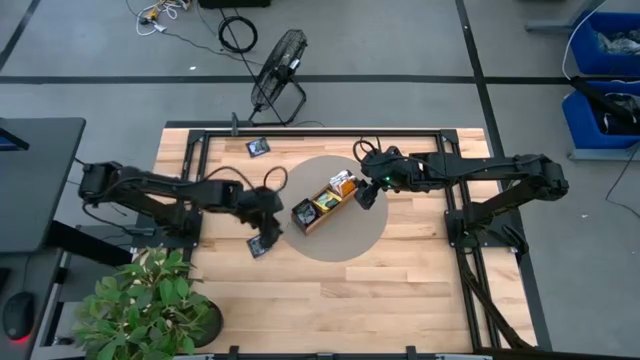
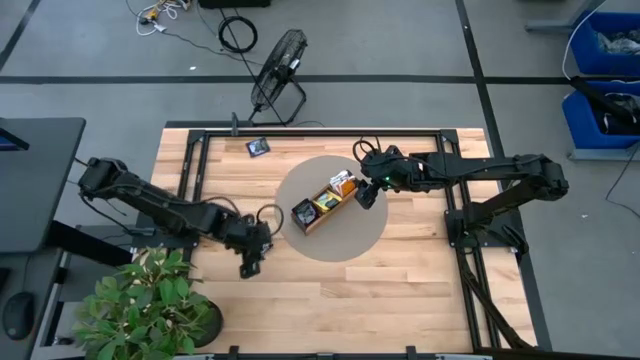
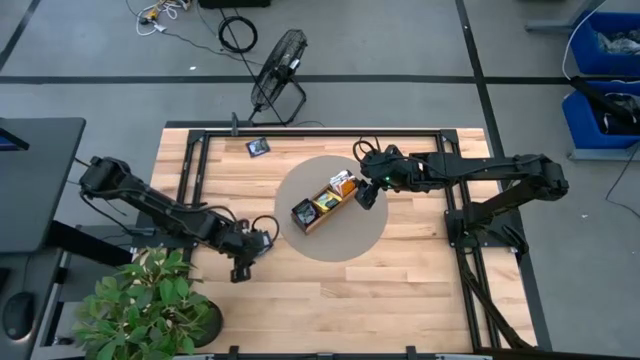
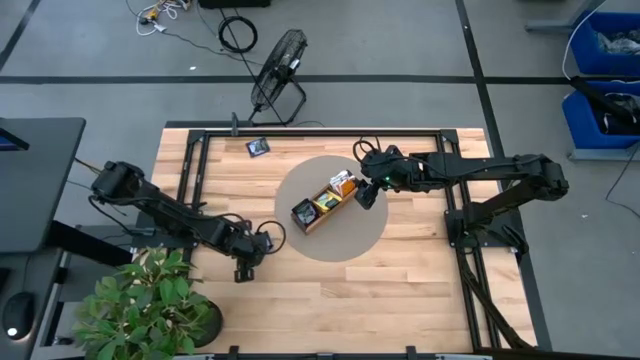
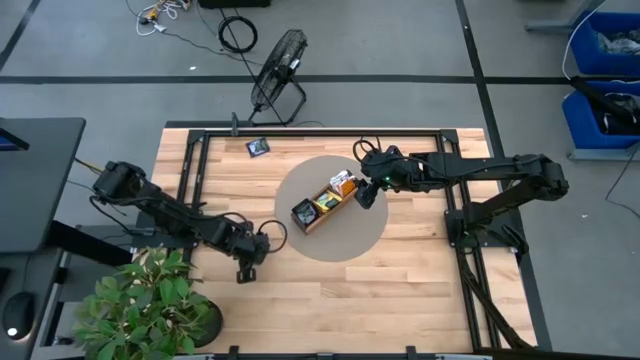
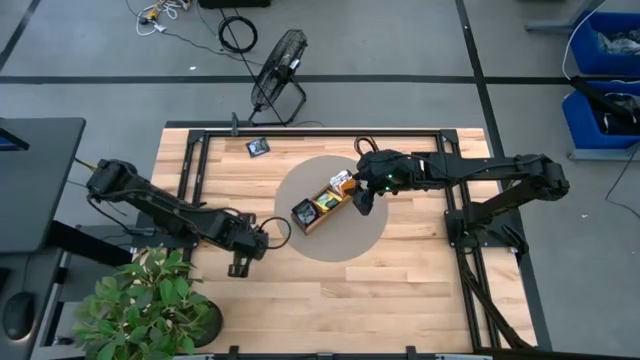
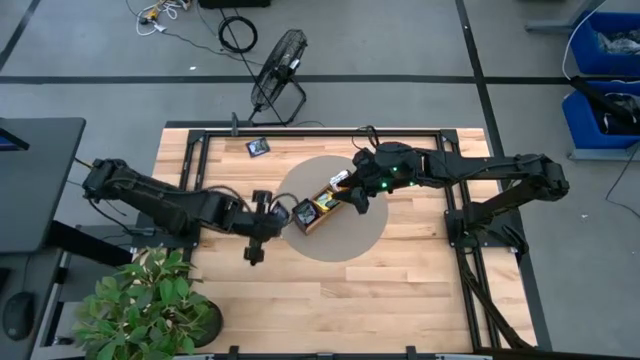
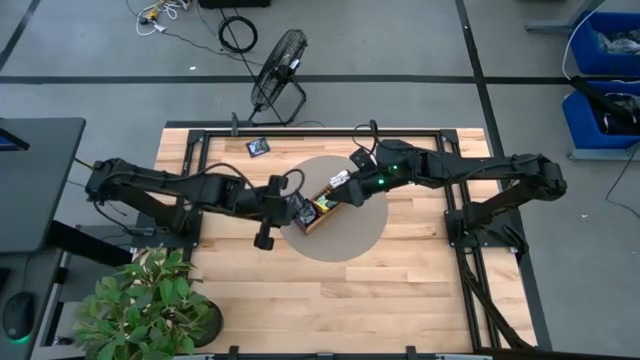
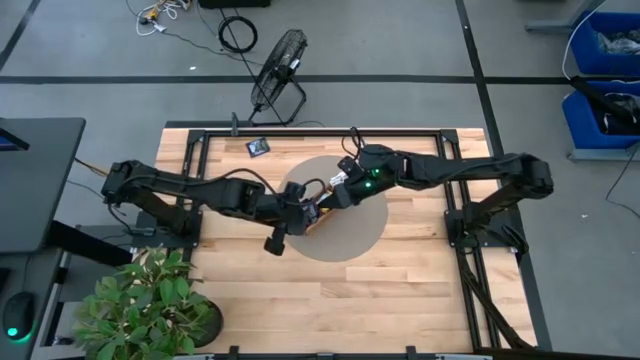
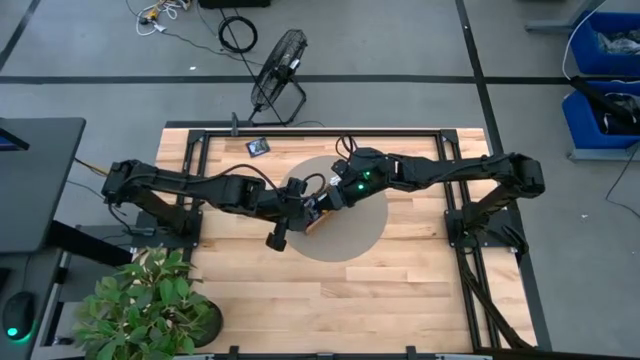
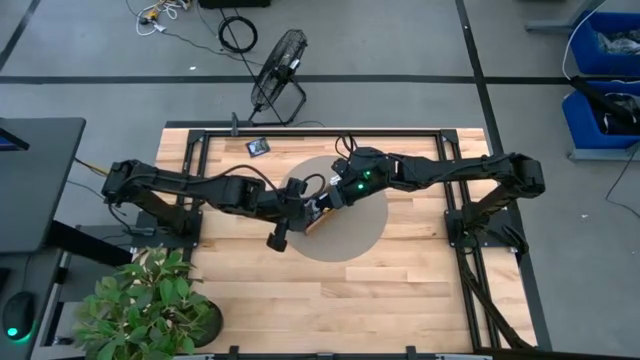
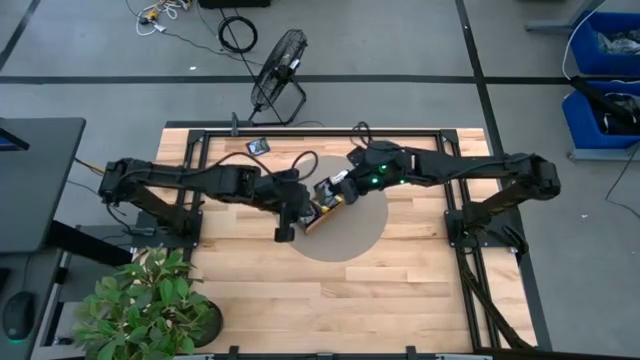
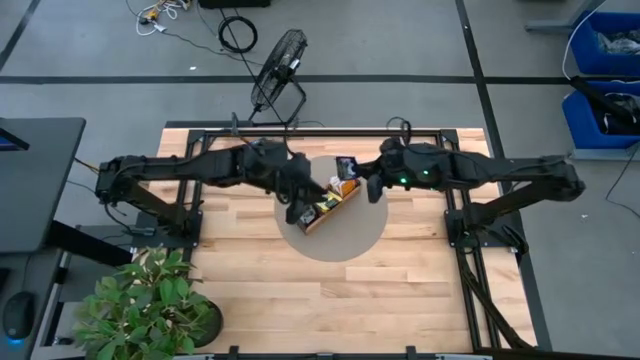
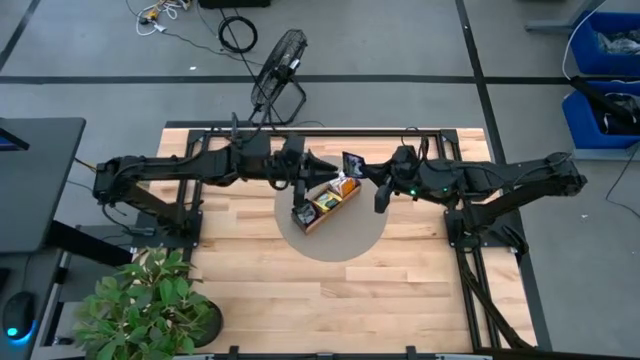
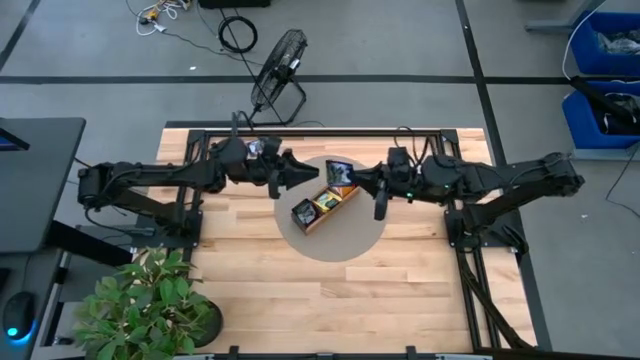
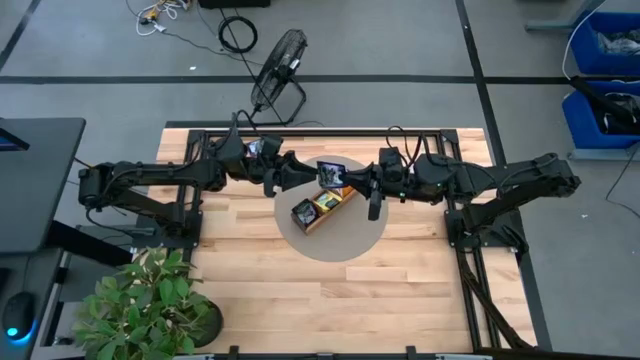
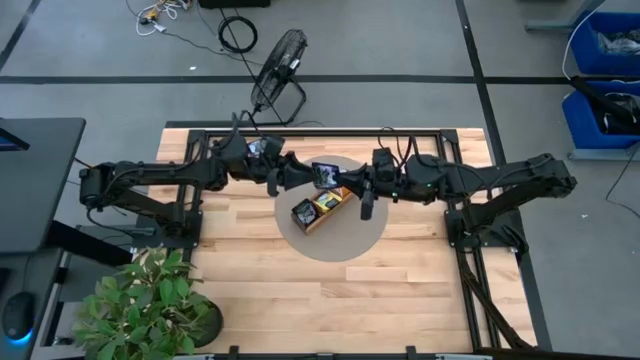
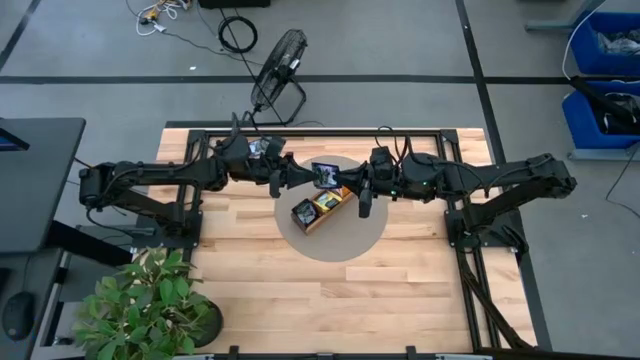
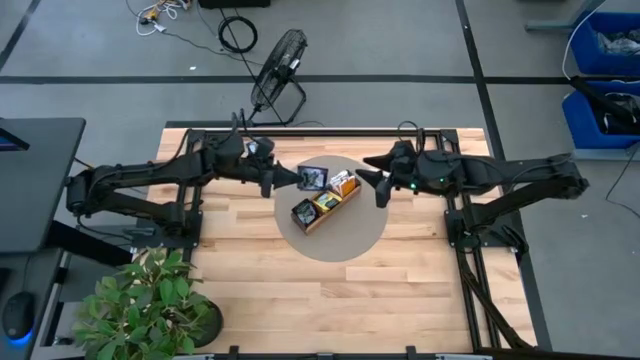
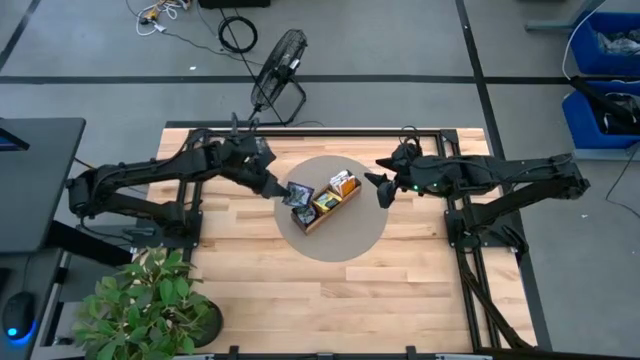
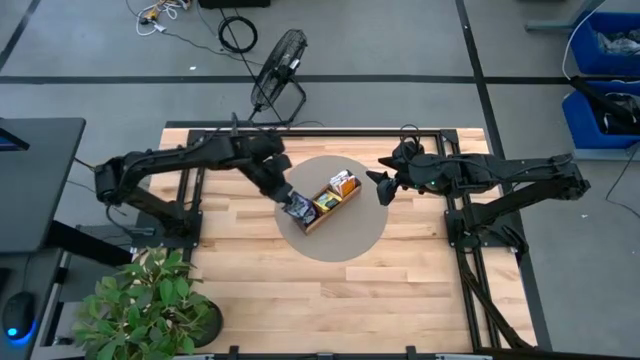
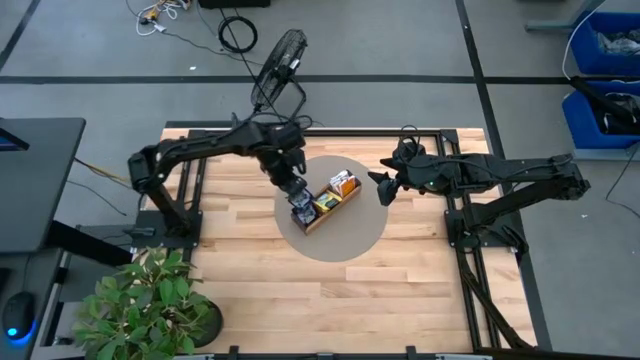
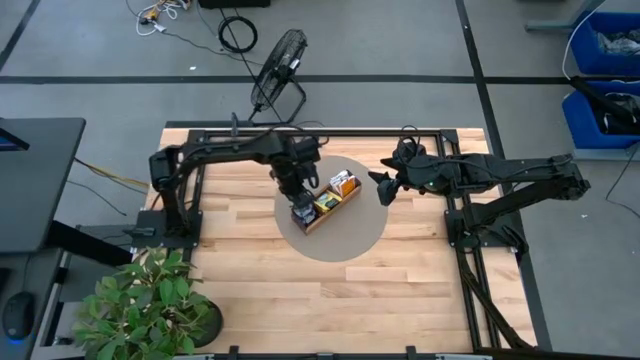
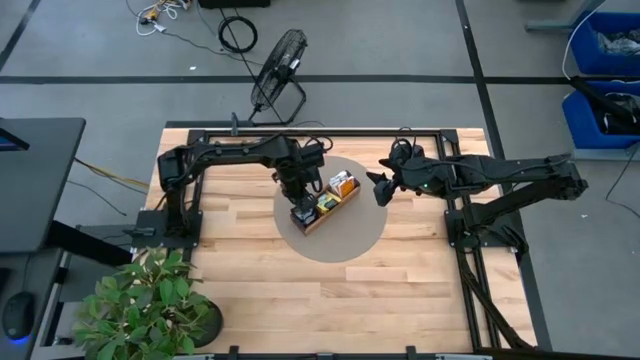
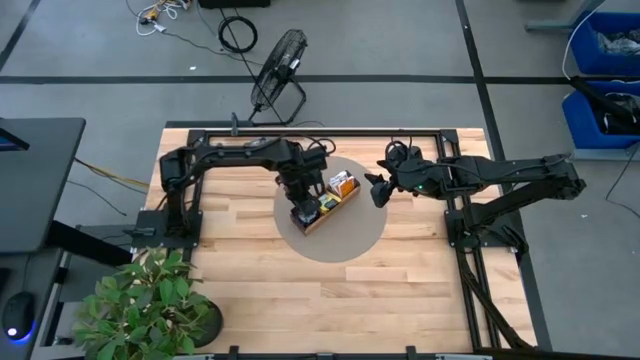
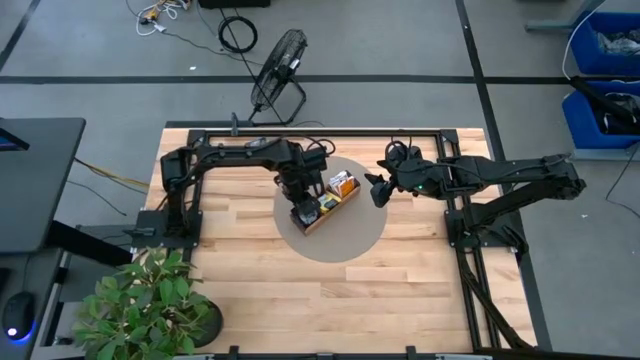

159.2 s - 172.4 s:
Task: Pick & Place Tea
Put the black tea bag into the left section of the wooden organizer

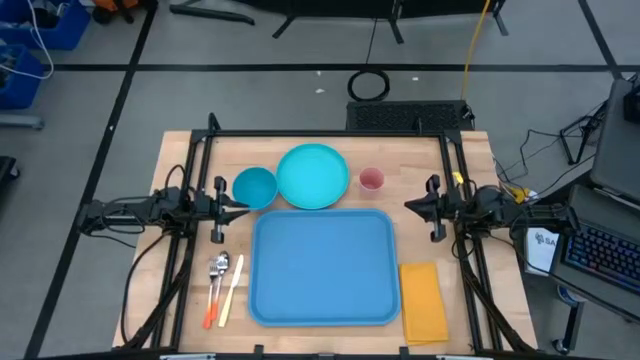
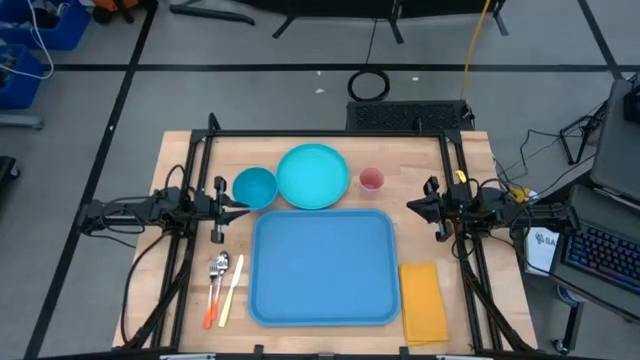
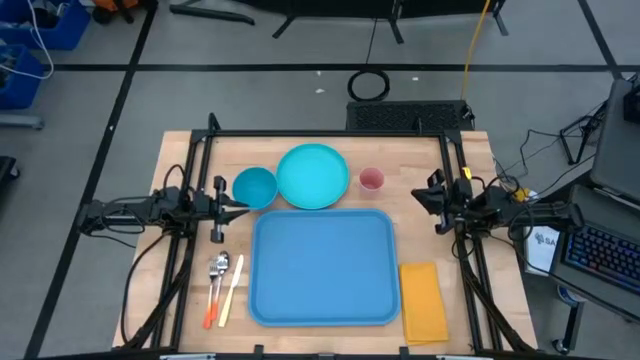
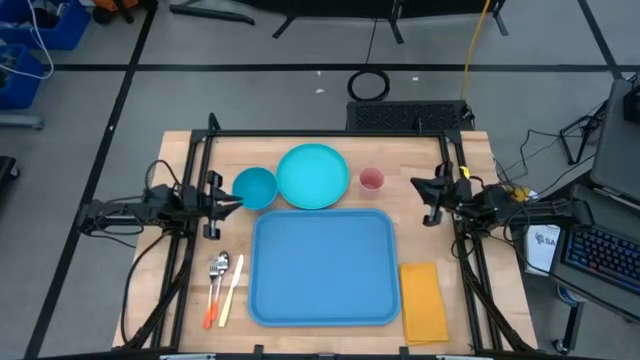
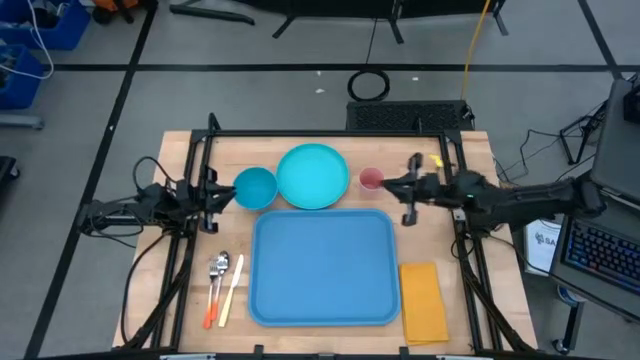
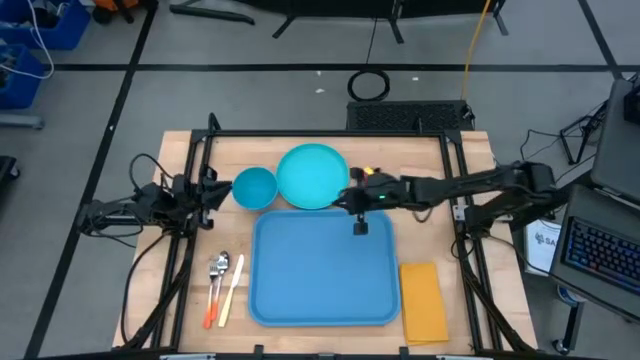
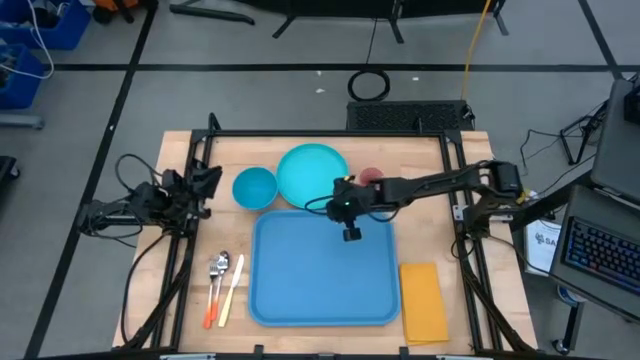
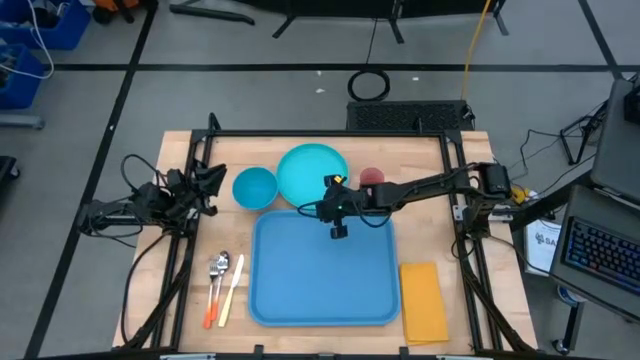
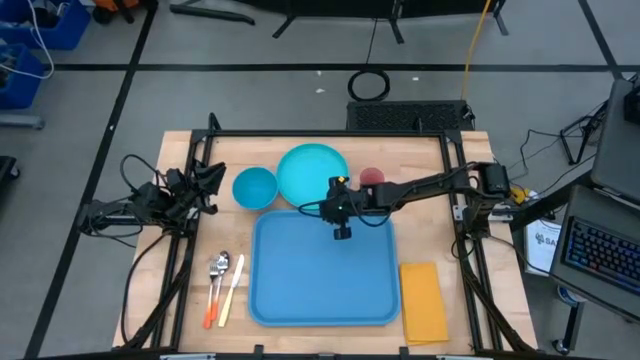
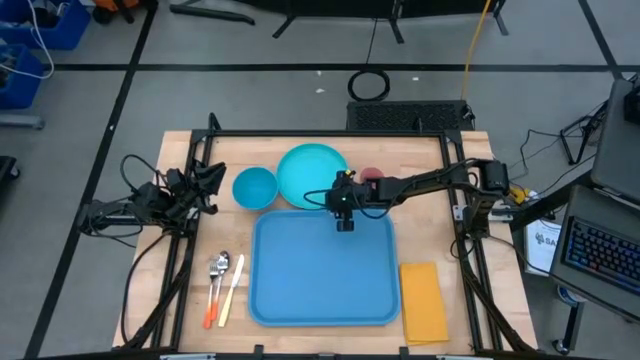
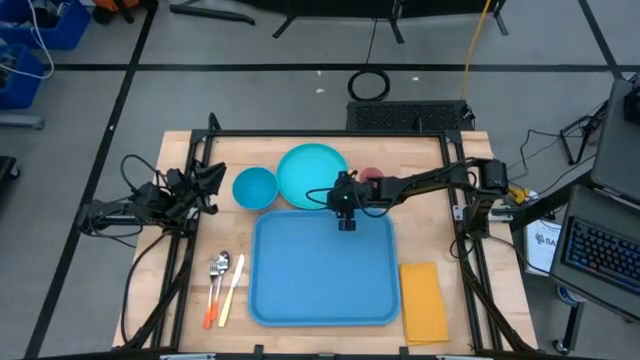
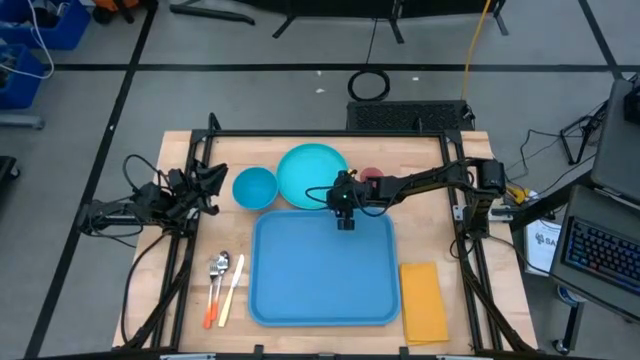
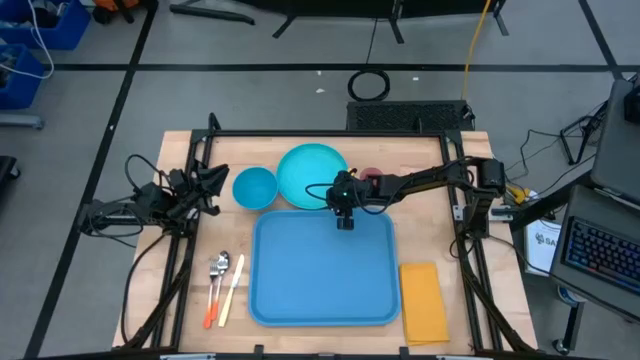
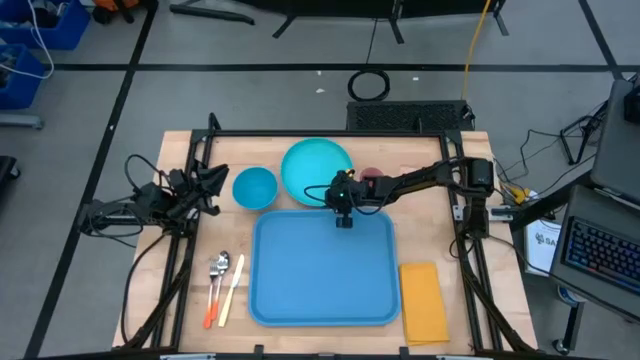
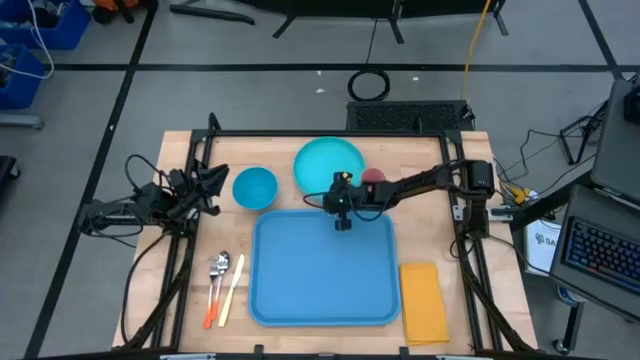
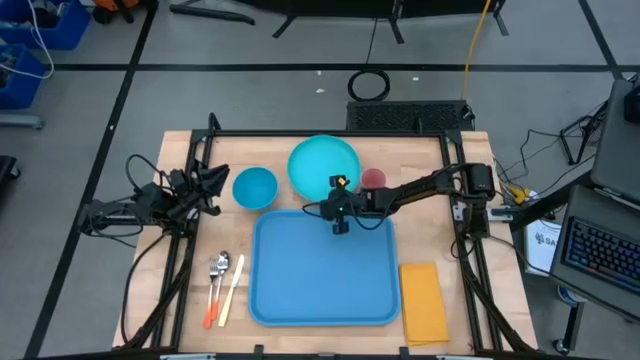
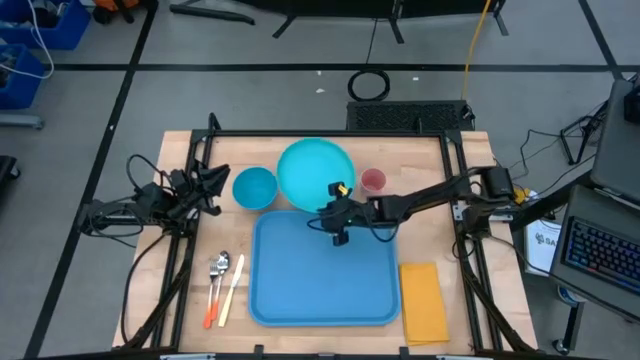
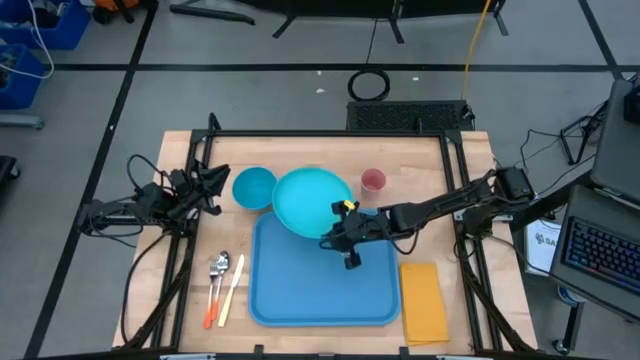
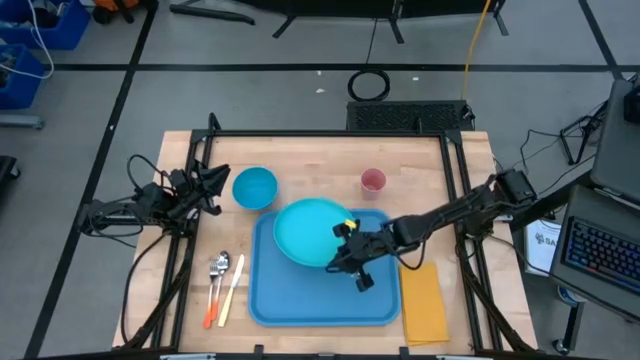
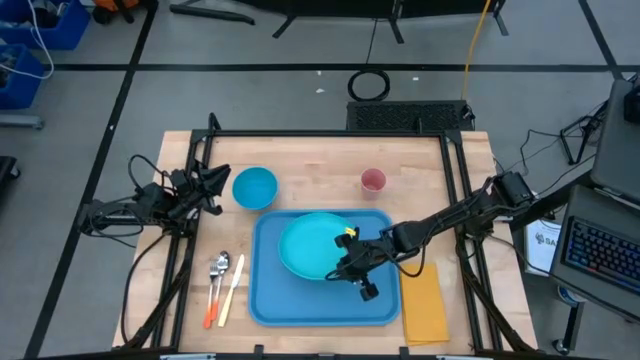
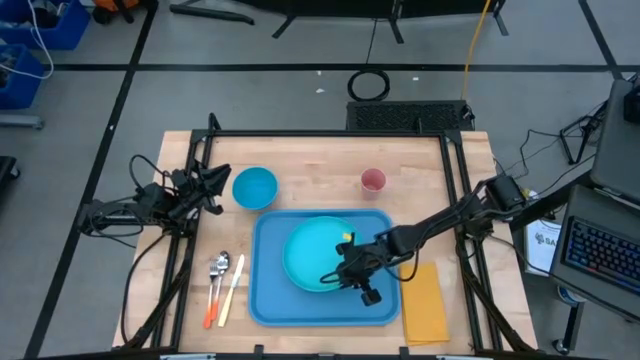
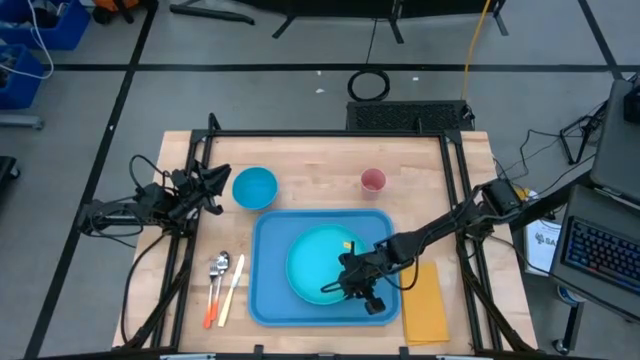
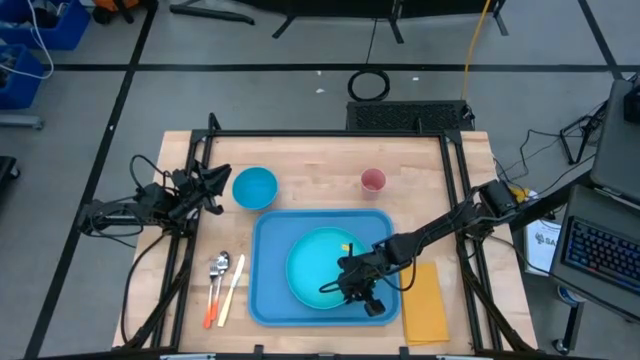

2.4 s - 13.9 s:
Task: Set up tray
Put the green plate on the blue serving tray
